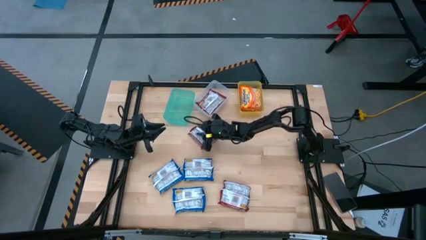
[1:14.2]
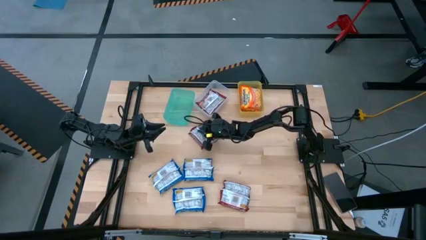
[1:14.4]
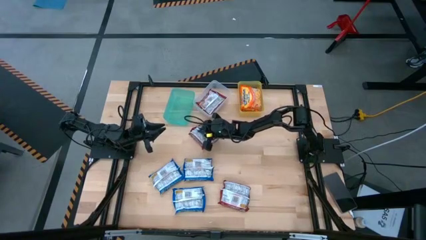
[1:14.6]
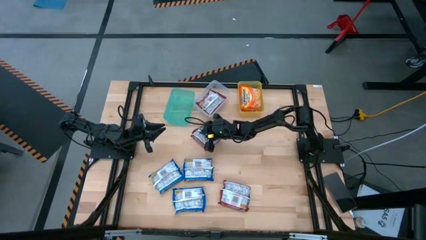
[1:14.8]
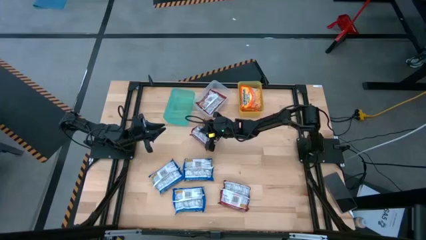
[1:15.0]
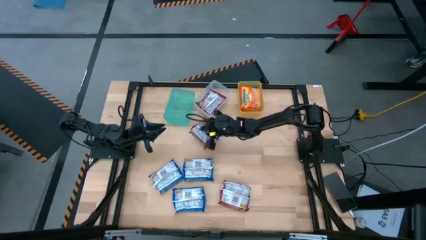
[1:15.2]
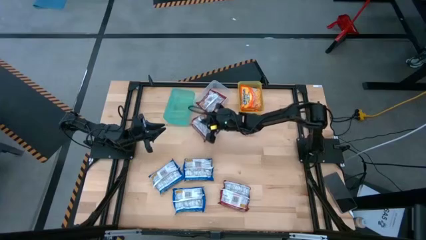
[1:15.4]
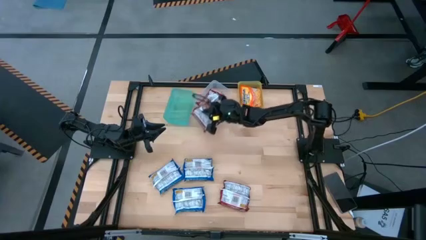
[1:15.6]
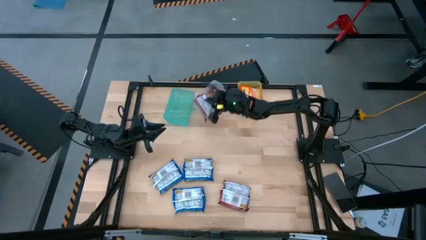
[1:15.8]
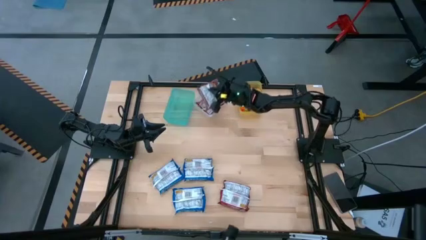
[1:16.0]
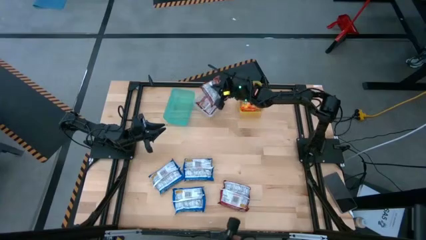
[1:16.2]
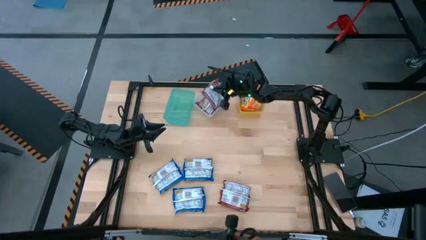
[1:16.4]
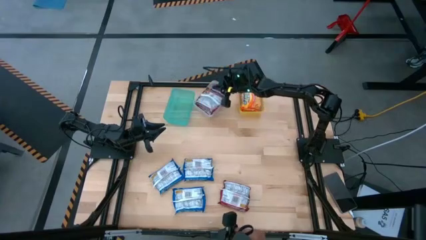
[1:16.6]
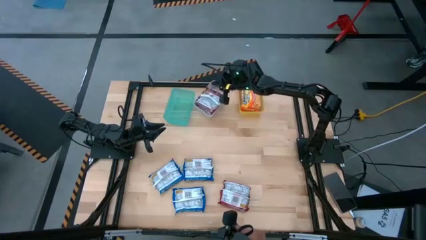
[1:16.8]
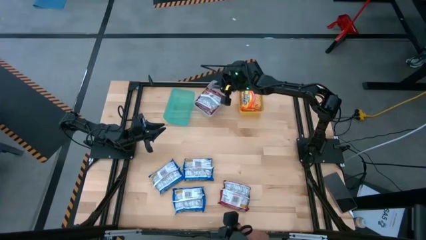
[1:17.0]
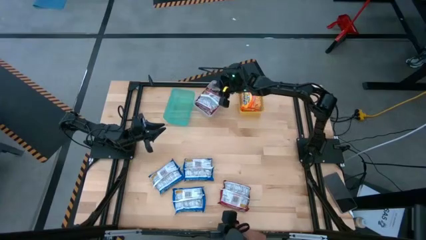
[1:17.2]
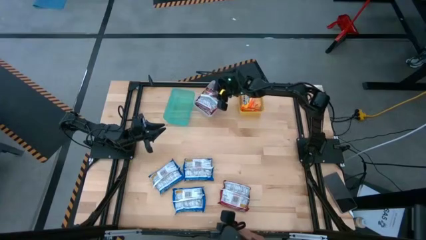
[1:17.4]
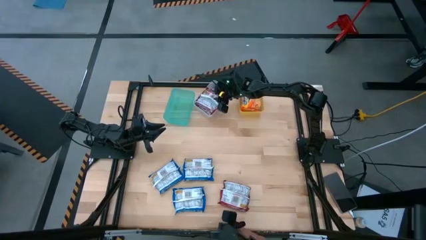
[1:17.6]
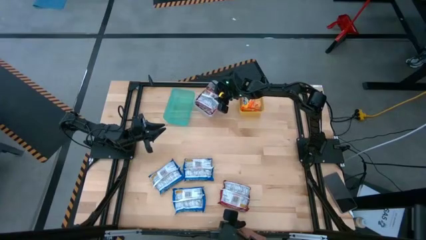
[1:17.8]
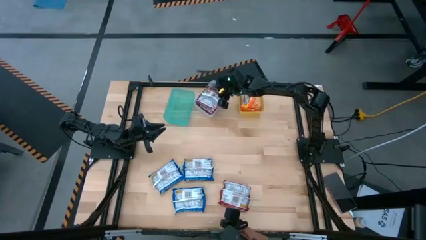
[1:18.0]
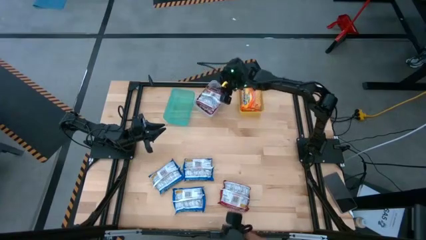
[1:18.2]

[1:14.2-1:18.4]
Task: Sort Maruchan noodles
Put the top red noodle pack into the transparent bin

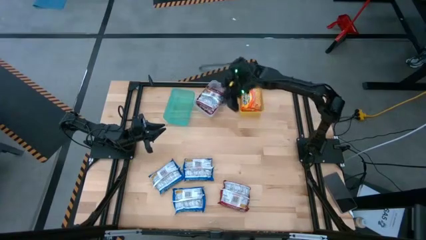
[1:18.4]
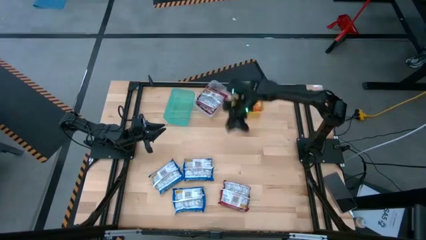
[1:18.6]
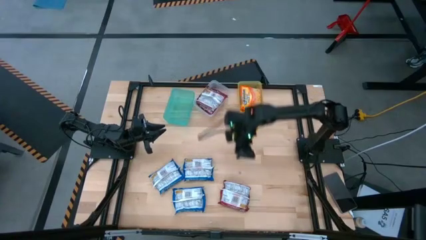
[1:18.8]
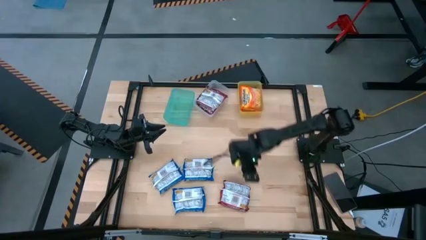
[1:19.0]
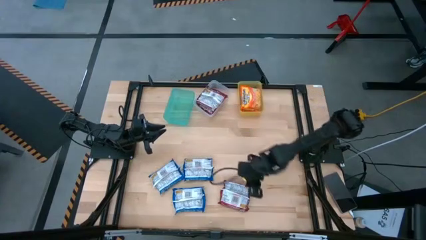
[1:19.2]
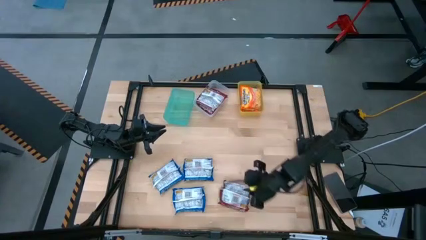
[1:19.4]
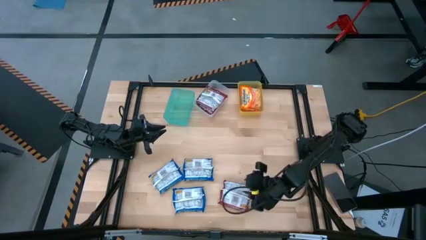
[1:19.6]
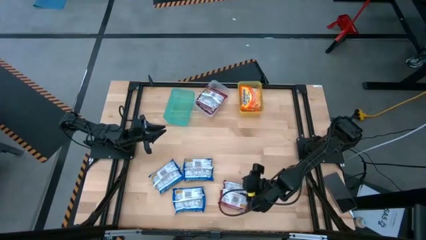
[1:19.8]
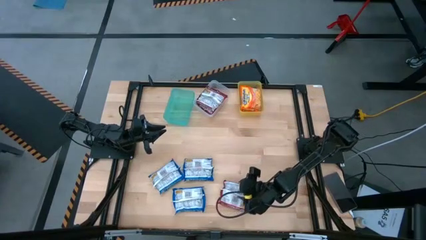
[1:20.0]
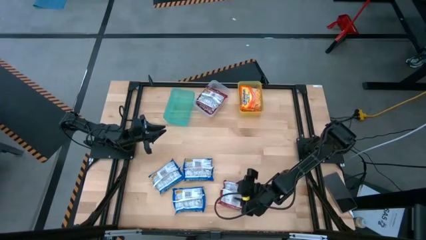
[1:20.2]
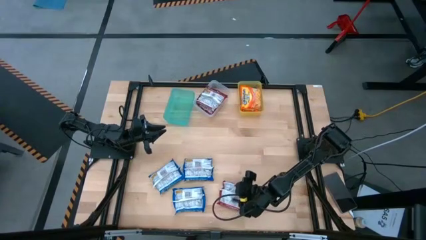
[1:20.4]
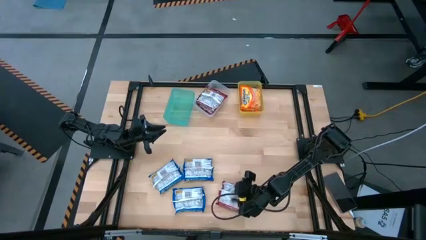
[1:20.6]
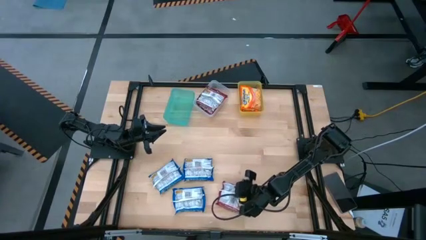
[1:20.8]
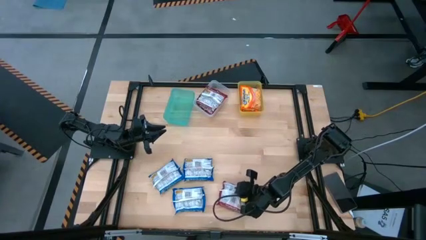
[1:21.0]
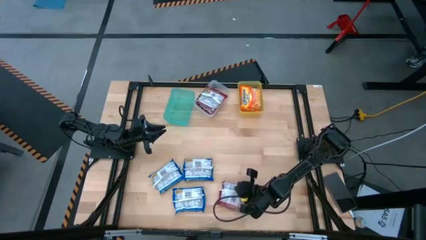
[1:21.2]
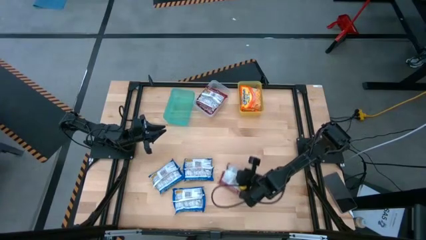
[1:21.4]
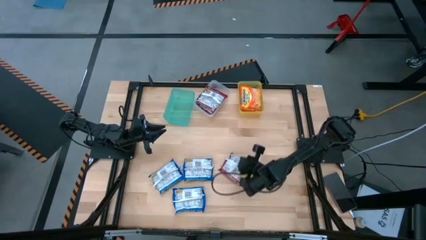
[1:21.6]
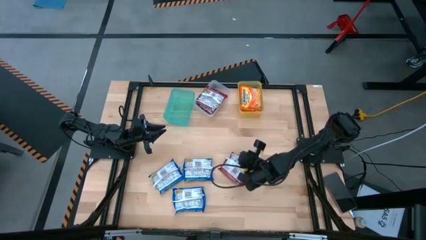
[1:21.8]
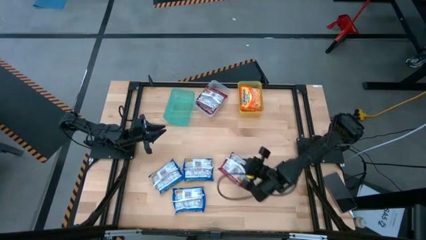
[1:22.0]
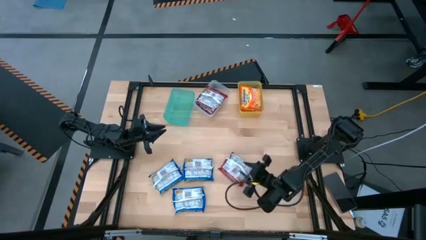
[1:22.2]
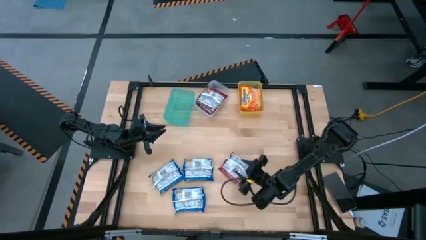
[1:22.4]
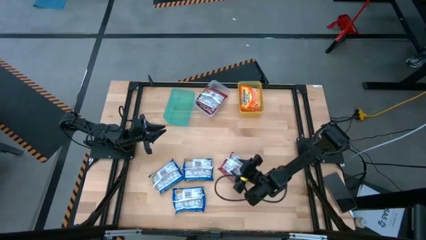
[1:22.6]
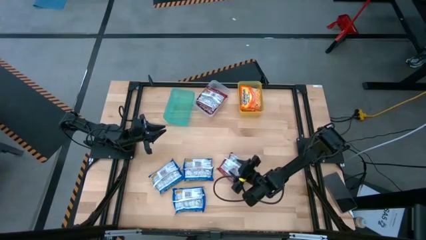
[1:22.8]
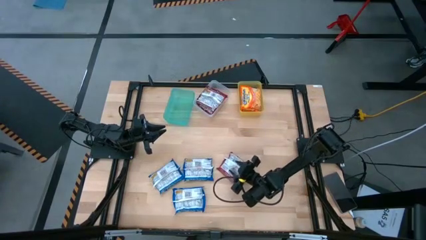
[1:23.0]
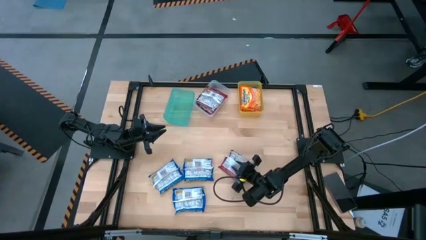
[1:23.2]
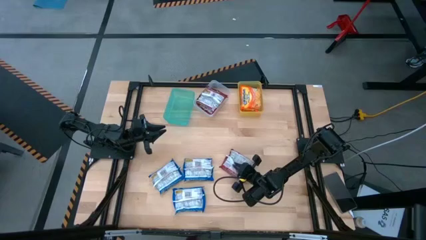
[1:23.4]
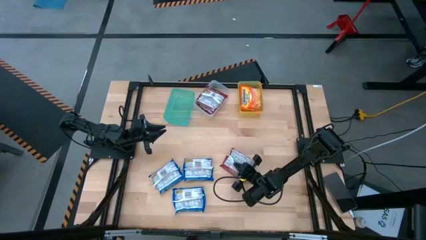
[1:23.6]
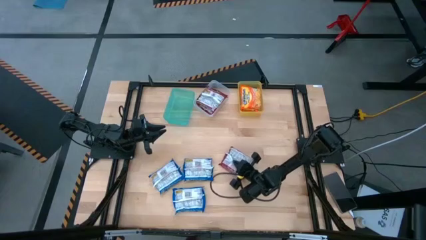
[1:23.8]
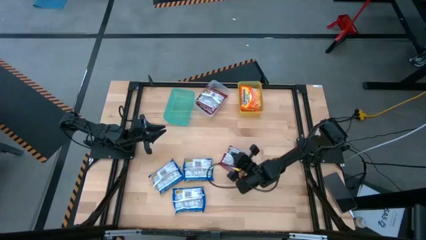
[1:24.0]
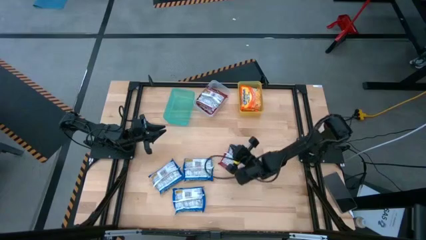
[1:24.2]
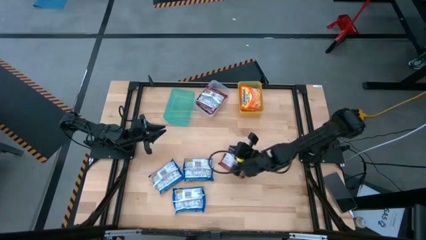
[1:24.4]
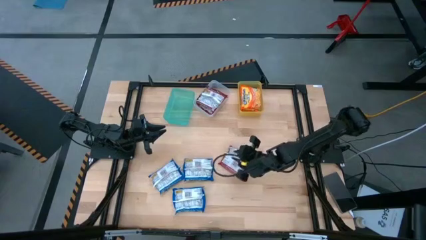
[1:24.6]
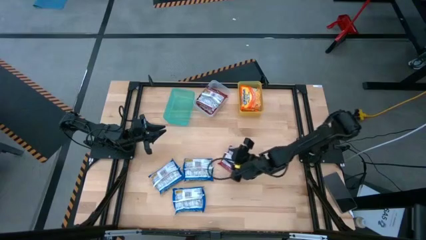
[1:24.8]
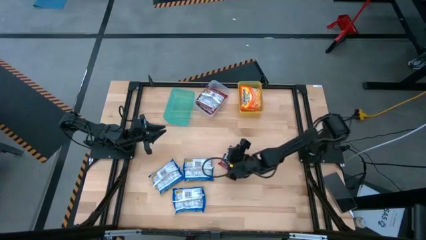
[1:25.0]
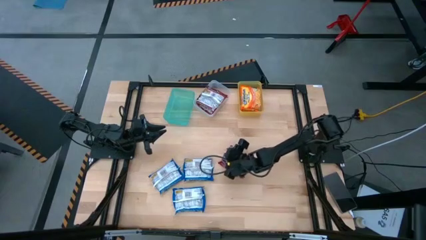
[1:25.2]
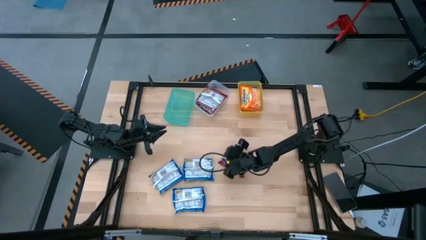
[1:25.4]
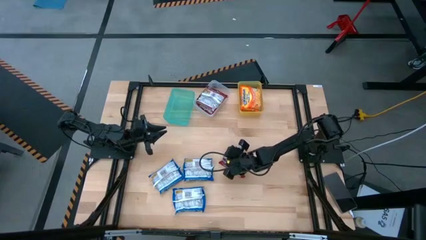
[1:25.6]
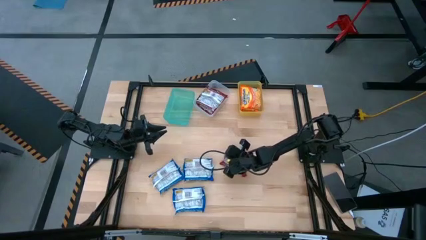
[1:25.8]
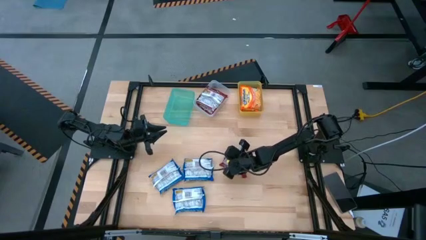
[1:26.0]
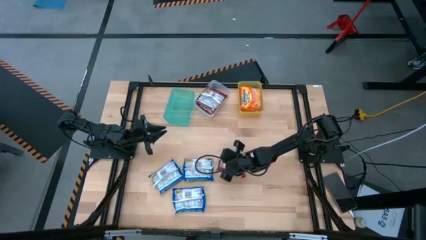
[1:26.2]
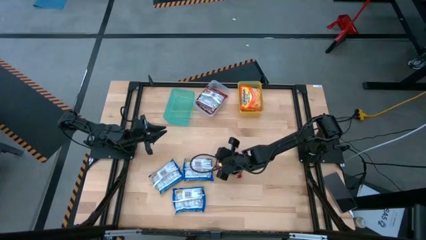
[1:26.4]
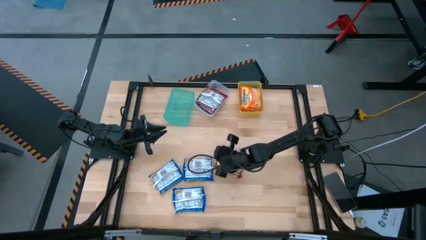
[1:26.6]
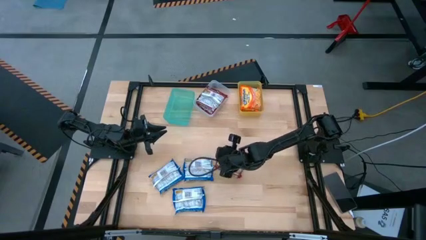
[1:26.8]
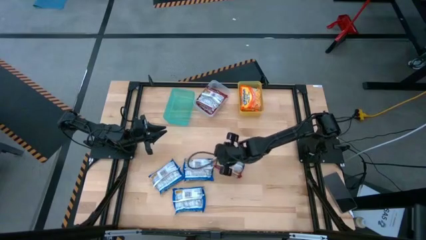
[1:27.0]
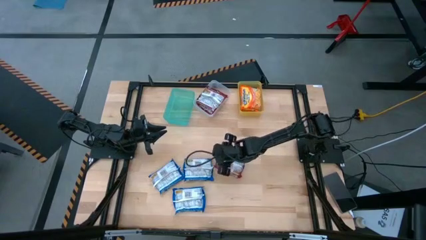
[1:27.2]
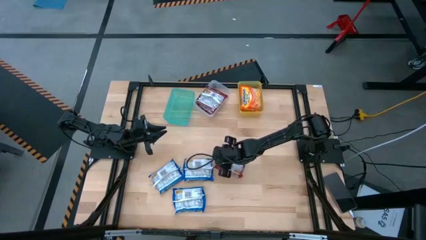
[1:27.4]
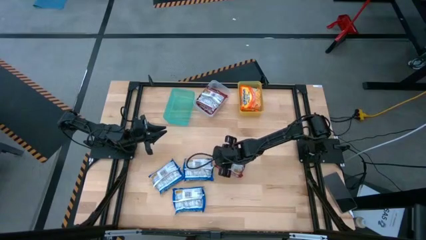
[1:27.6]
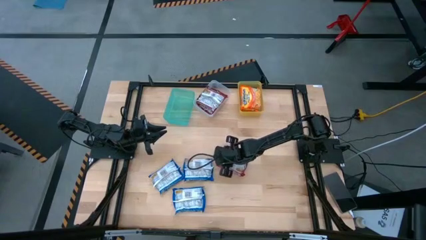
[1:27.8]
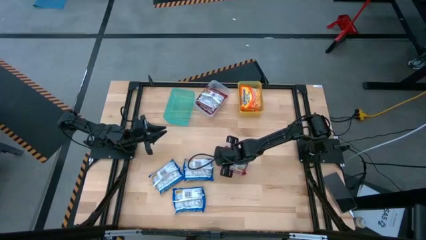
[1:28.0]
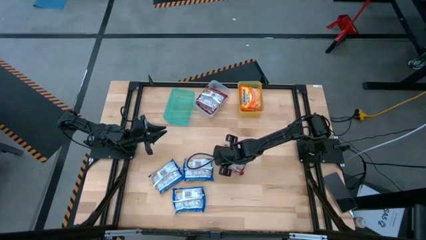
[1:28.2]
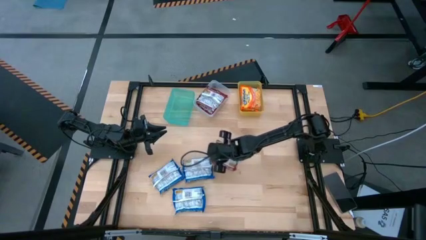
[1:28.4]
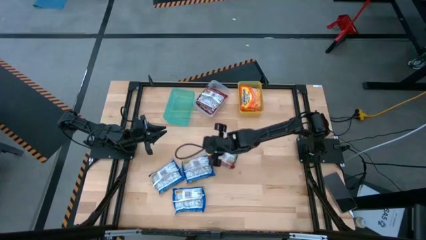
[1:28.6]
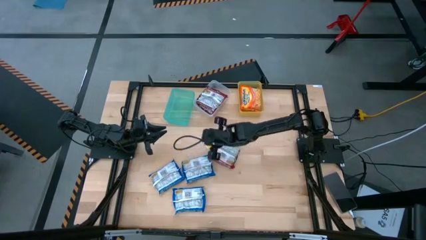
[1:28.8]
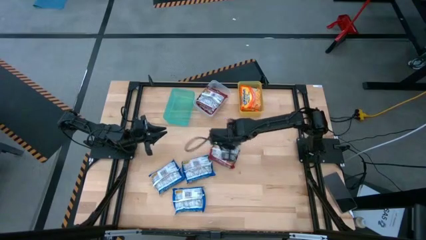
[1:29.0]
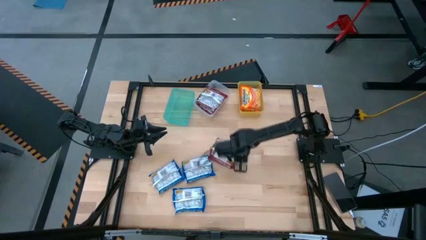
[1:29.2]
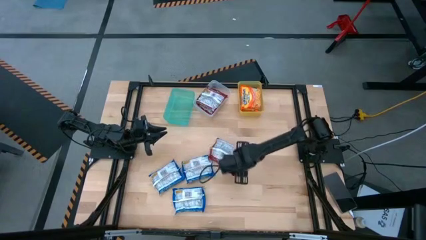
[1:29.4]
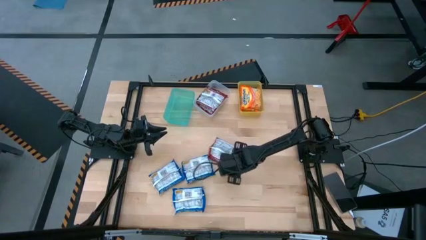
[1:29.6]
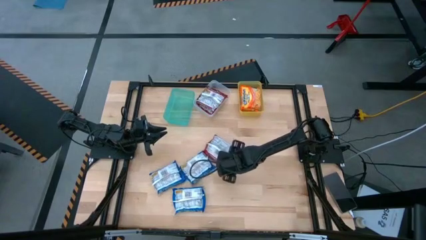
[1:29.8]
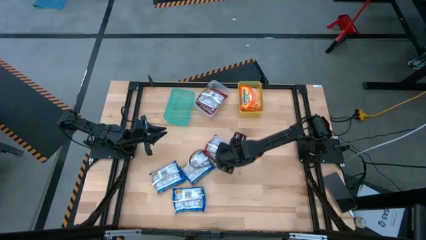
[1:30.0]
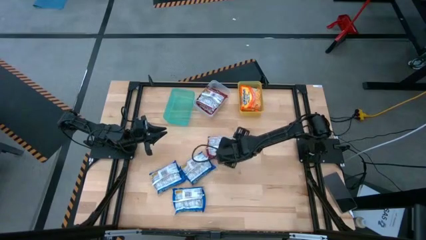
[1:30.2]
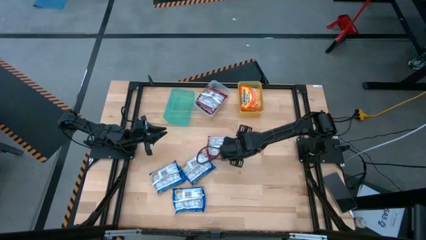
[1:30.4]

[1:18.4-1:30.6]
Put the red noodle pack into the transparent bin
